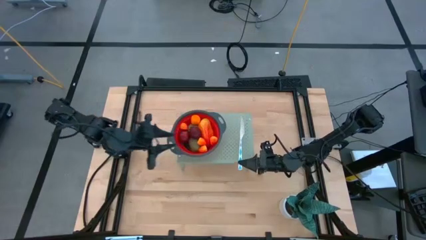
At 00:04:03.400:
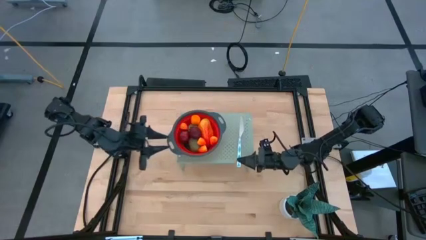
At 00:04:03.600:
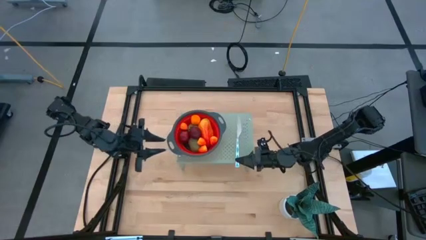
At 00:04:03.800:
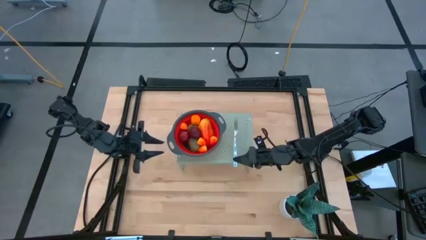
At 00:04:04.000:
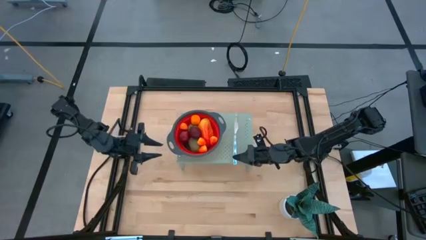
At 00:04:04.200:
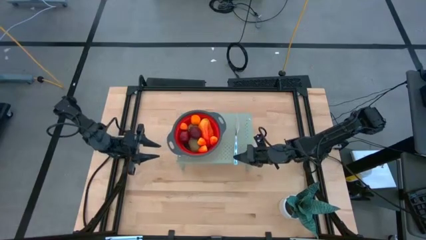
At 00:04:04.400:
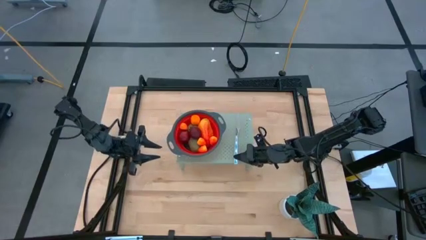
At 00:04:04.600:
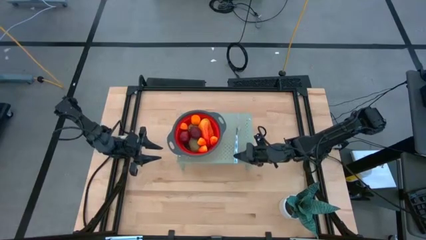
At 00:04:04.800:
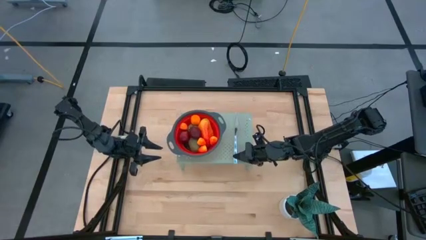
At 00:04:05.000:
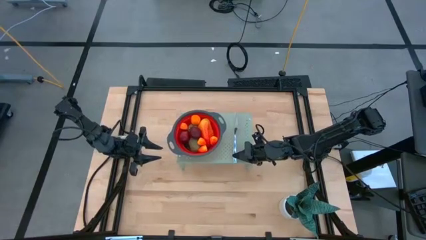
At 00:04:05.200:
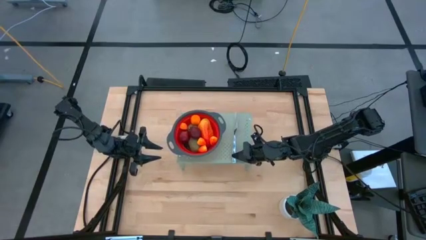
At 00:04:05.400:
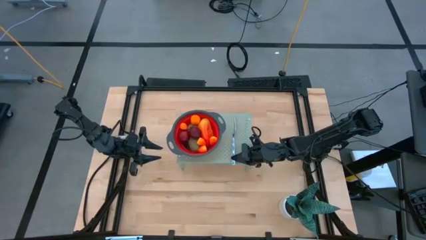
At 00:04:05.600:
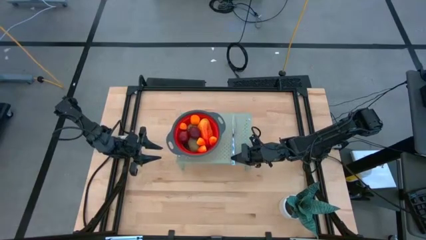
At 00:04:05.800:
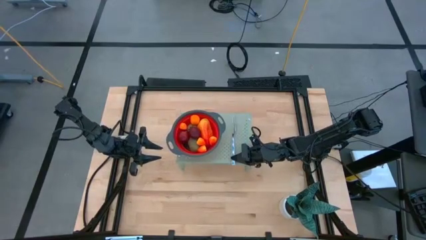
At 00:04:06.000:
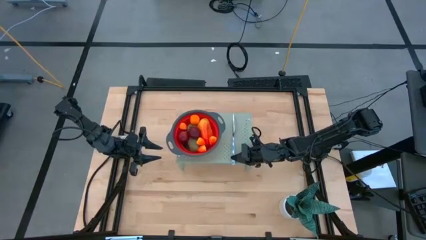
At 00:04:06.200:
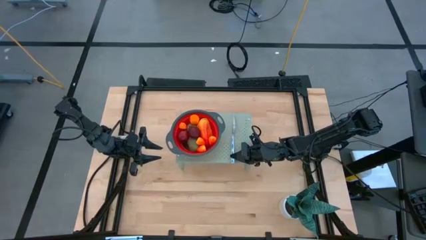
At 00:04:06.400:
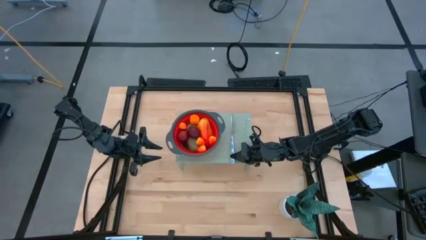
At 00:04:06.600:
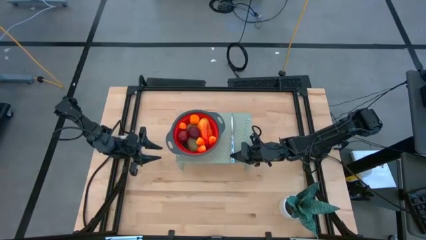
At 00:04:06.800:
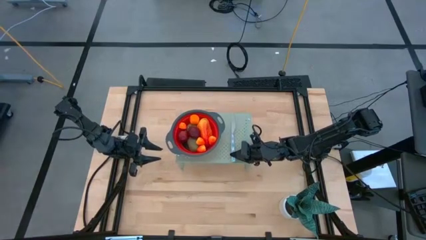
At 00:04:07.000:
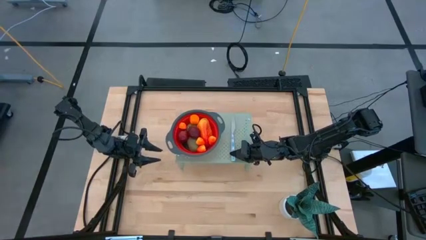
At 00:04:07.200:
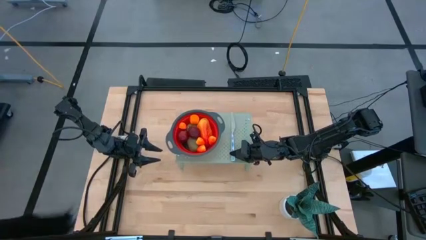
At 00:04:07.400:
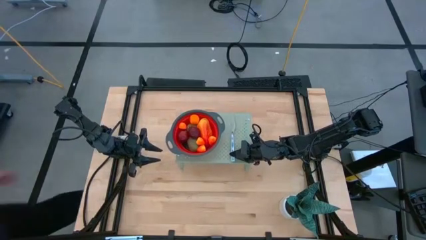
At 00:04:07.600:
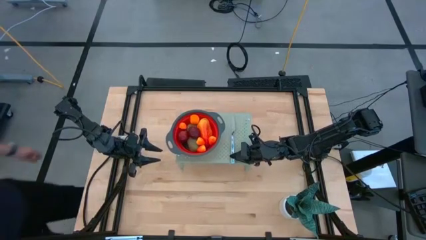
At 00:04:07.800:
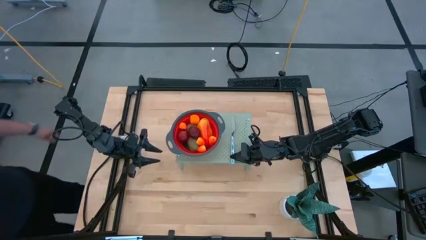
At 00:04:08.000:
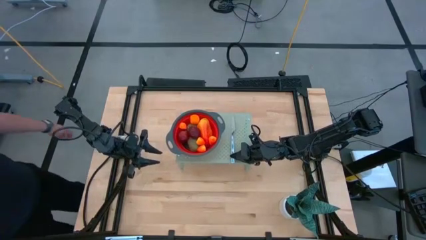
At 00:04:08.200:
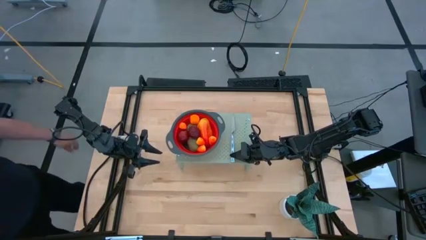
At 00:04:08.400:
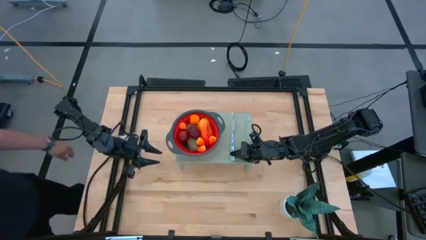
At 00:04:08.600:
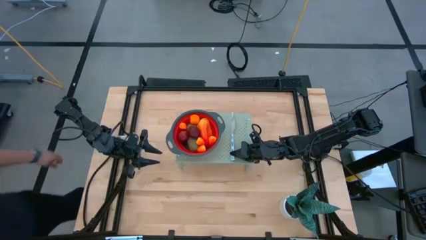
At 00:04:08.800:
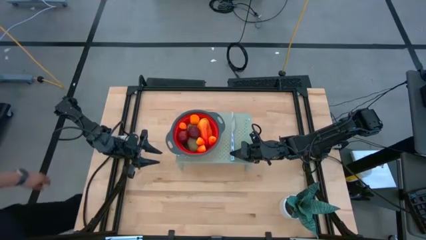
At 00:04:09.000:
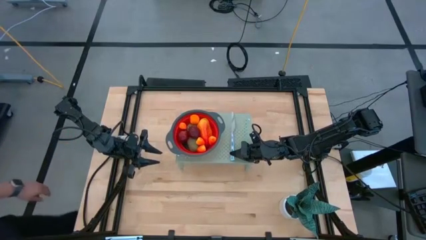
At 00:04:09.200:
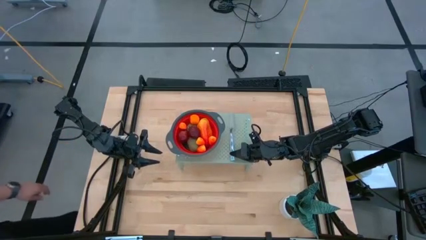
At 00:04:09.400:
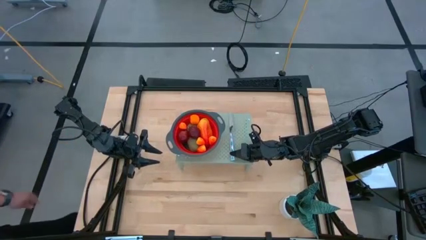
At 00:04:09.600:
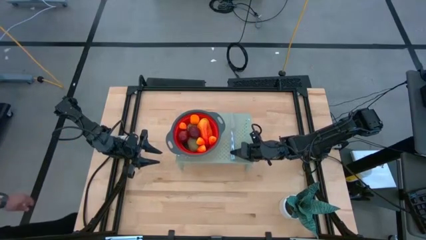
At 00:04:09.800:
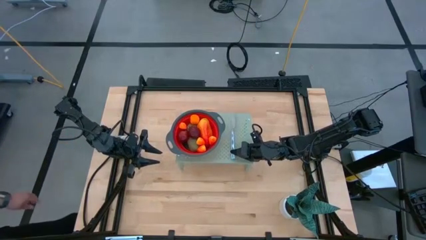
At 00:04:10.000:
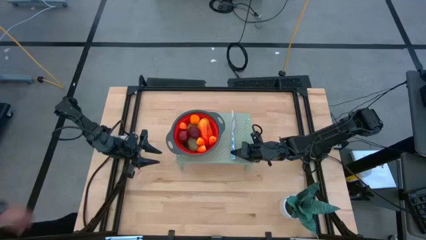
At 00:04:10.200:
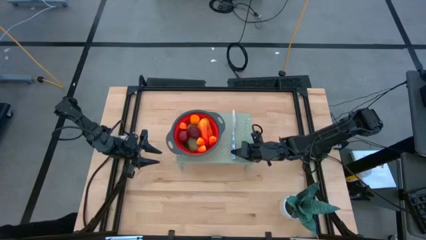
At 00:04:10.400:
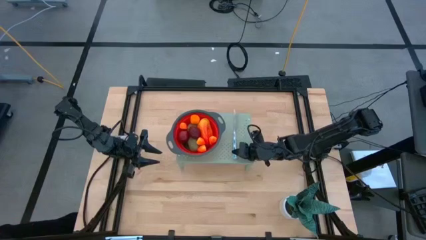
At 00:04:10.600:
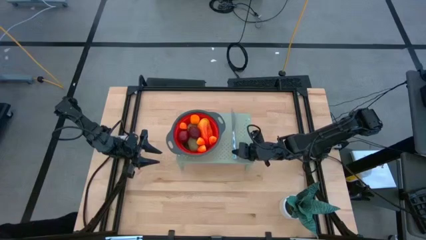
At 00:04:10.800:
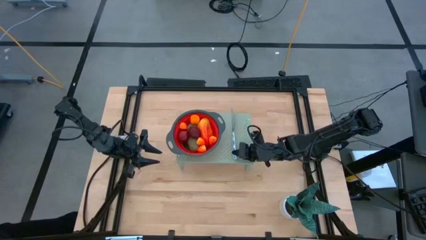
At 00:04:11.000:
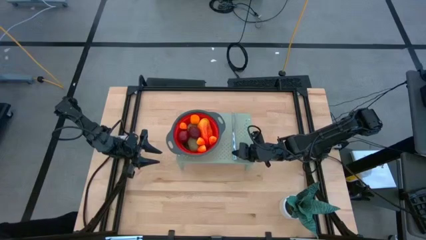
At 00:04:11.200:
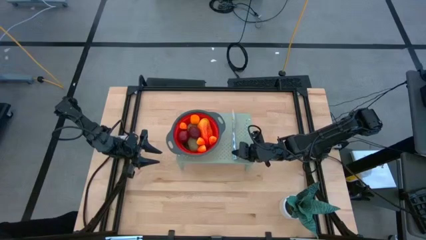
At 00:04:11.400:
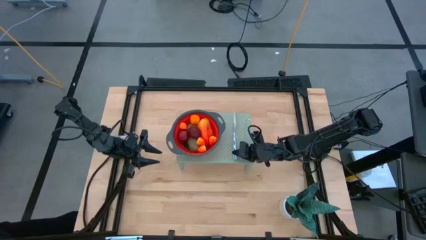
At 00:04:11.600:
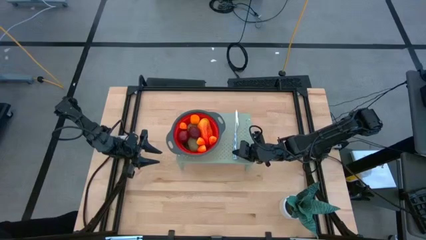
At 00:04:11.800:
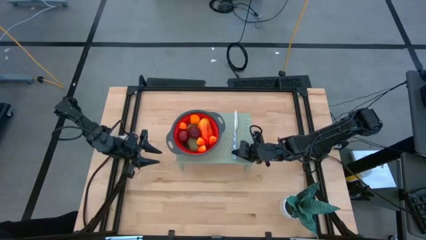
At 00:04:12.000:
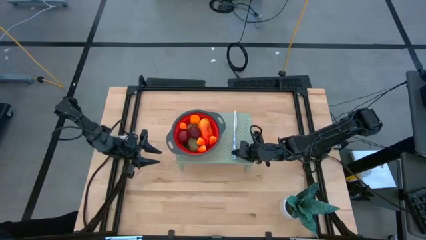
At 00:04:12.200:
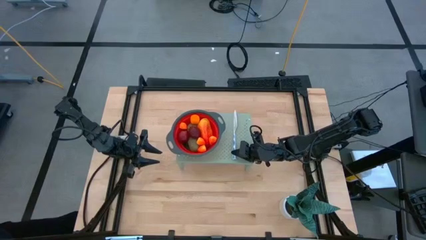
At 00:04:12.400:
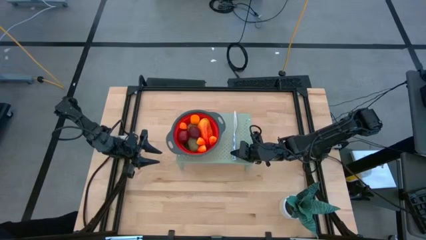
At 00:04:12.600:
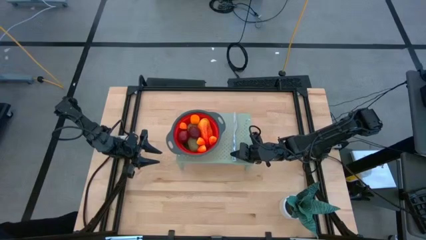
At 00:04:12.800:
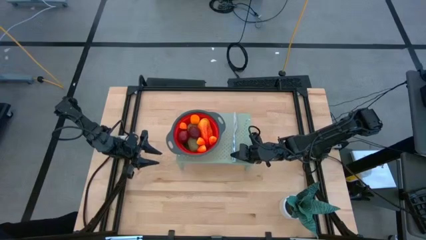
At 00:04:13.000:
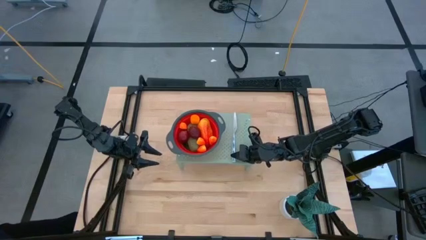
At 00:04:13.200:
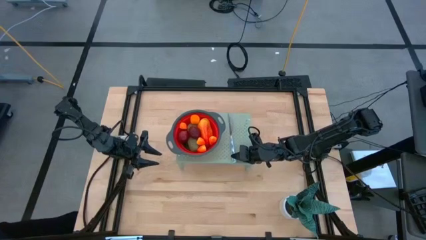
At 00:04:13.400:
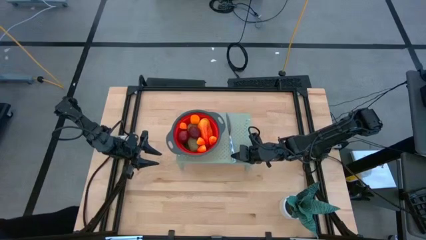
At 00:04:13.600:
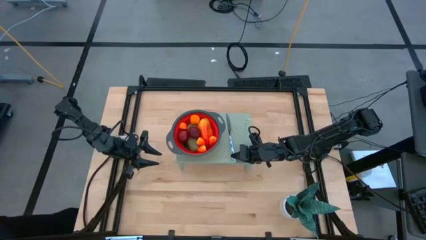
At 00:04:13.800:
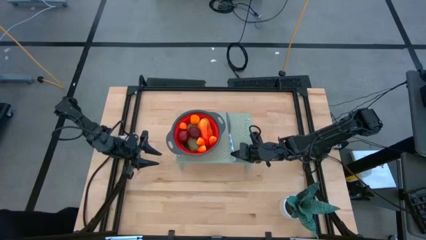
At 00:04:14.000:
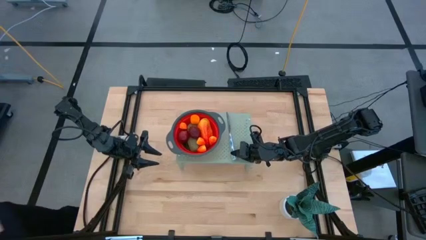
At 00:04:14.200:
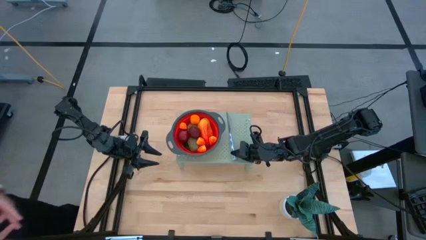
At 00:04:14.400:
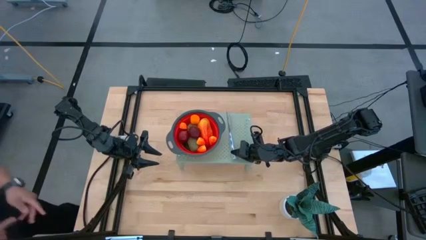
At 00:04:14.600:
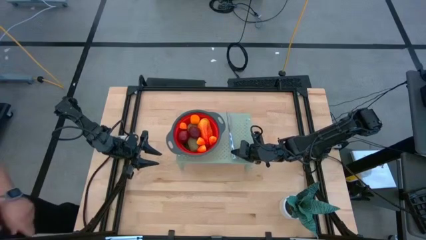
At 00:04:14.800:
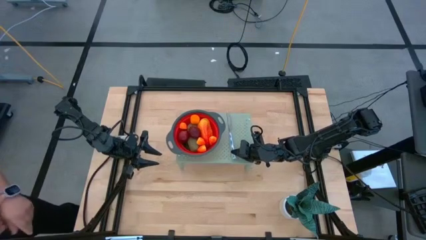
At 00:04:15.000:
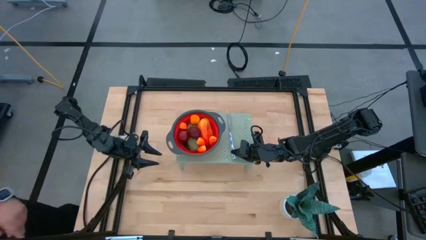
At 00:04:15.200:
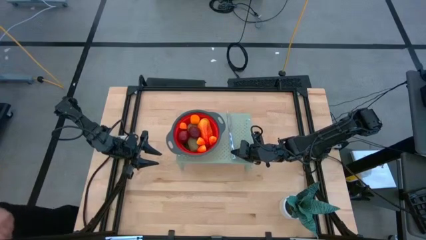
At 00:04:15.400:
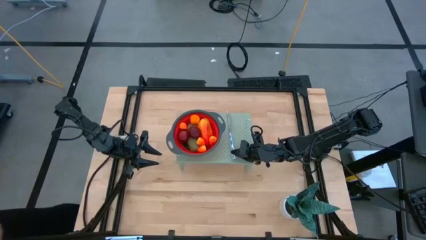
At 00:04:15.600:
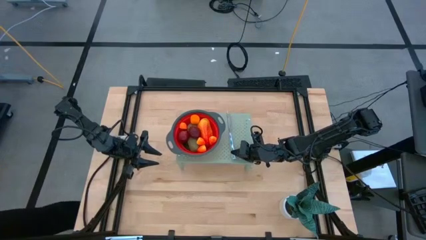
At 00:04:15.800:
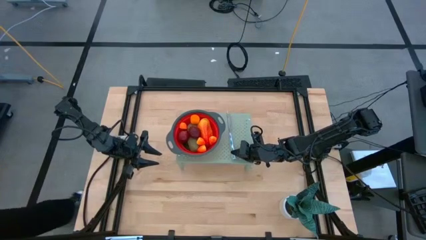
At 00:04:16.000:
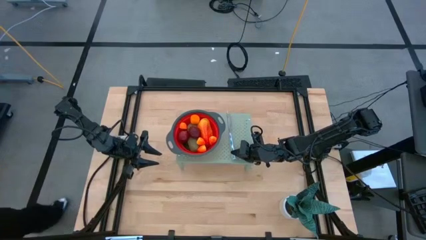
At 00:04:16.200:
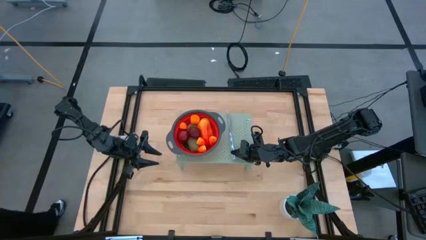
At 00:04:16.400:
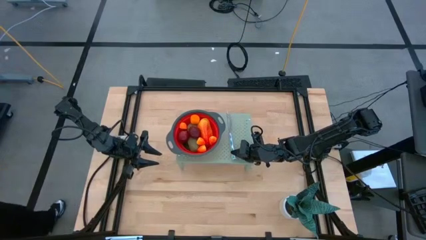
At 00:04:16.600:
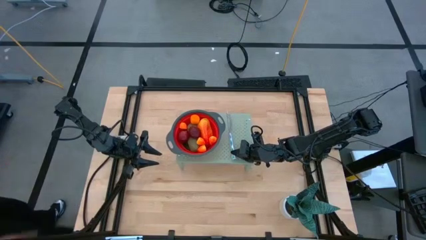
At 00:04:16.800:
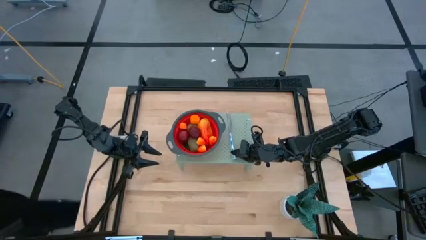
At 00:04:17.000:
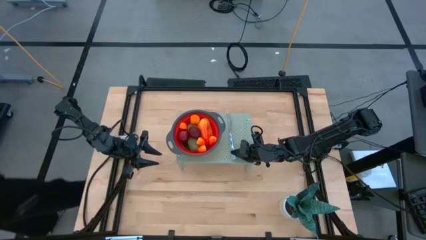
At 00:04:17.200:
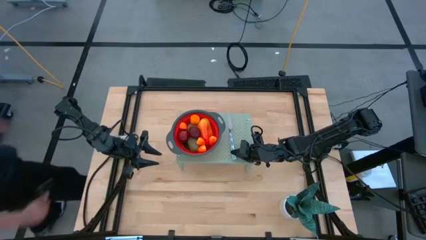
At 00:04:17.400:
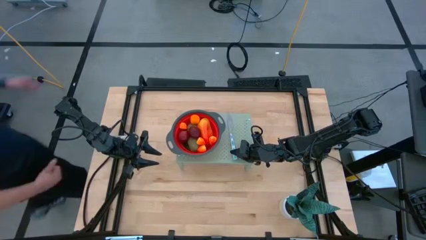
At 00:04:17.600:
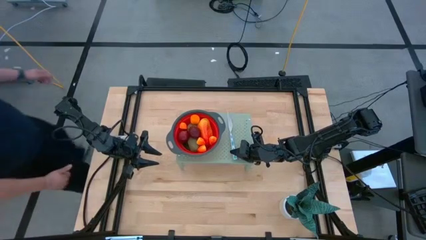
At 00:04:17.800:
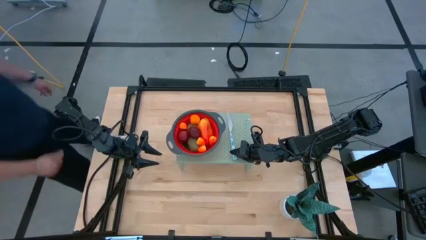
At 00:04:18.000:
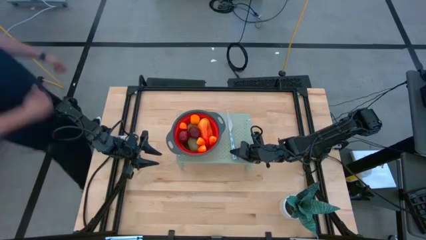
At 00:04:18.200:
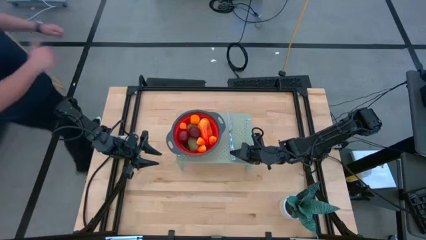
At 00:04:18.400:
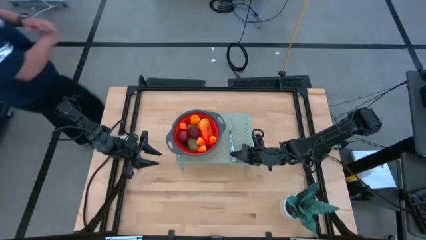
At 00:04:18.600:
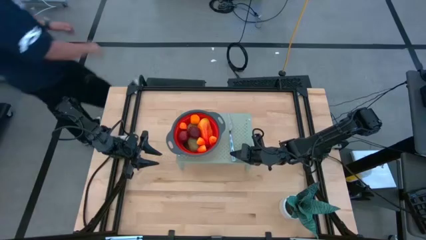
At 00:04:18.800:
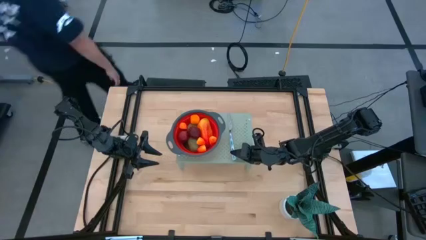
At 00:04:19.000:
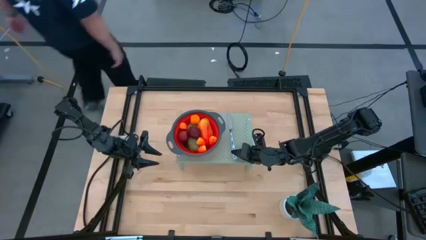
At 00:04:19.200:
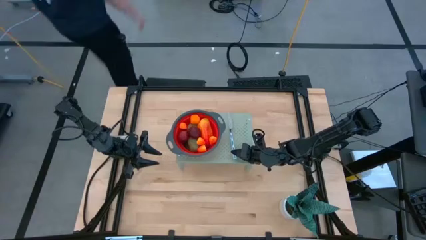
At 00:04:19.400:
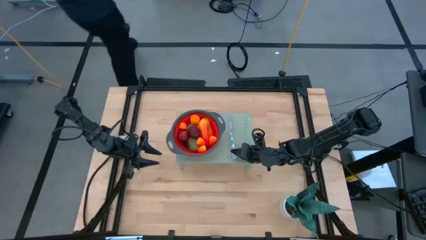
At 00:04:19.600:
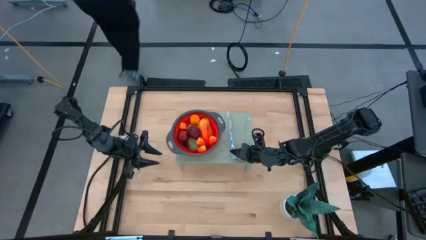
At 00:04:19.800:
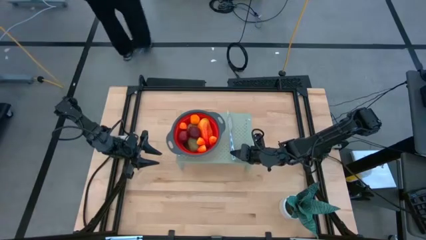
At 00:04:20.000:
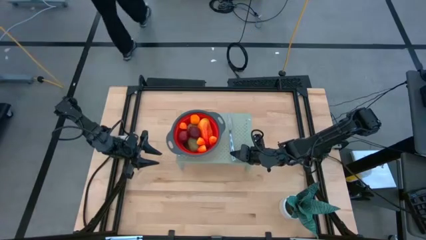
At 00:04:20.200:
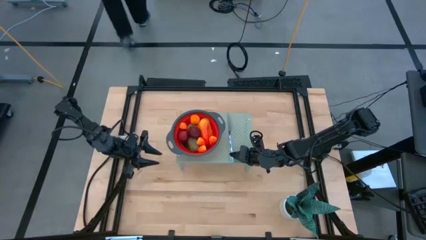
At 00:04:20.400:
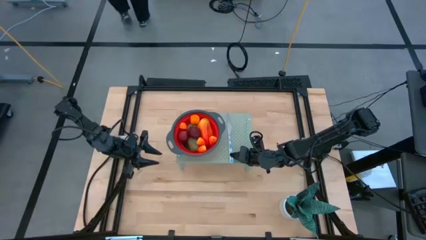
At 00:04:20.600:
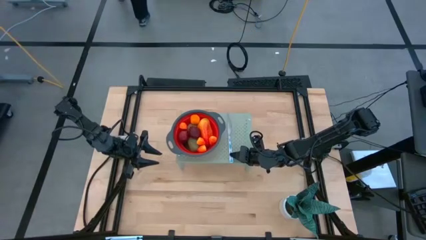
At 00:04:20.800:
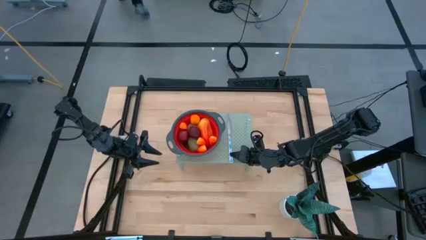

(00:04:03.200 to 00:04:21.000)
Task: Pick & Place Fruit
Put the blue table knife on the shelf
